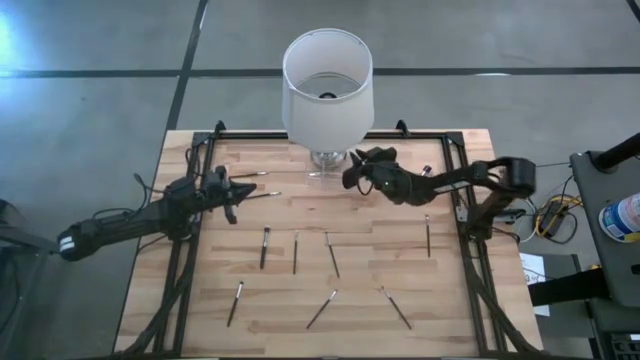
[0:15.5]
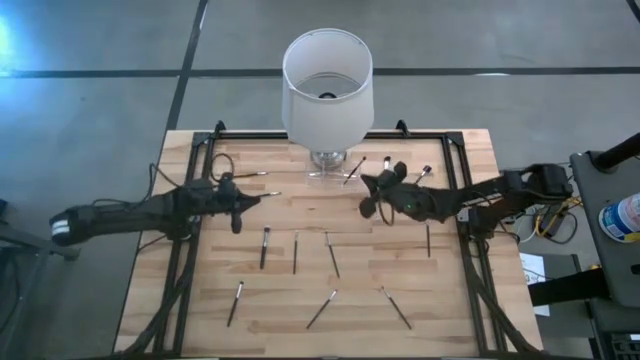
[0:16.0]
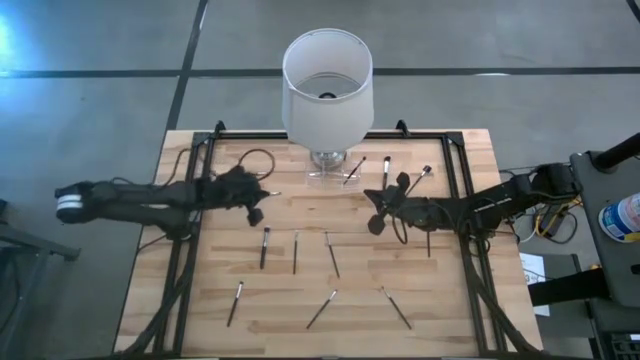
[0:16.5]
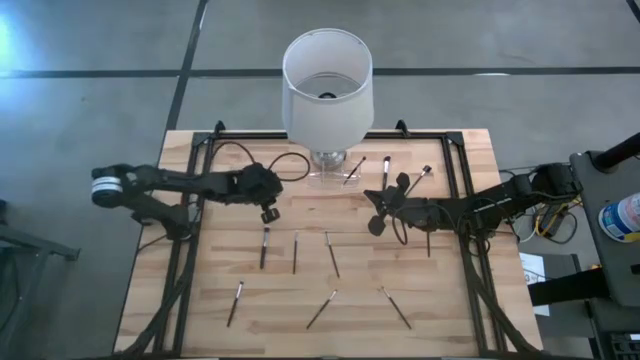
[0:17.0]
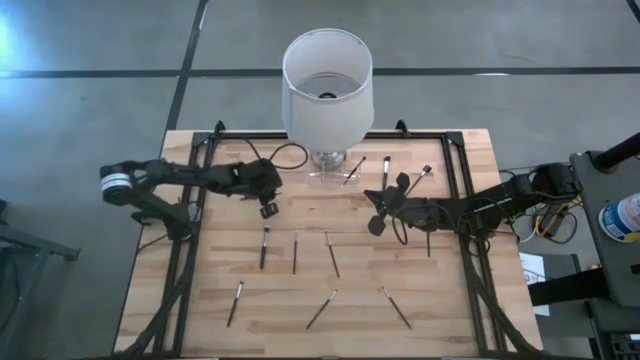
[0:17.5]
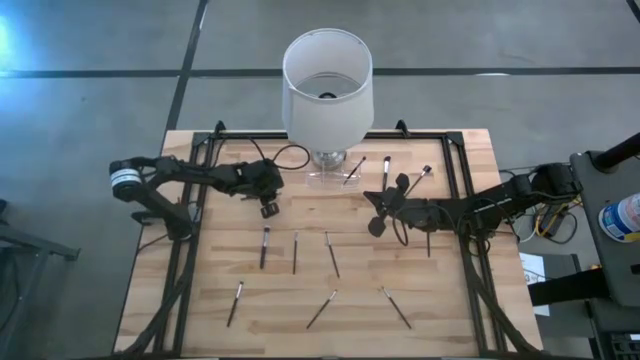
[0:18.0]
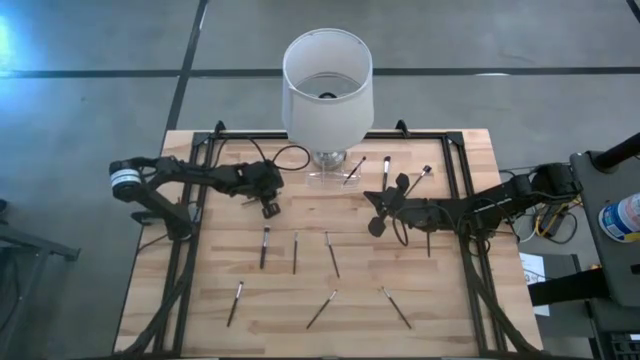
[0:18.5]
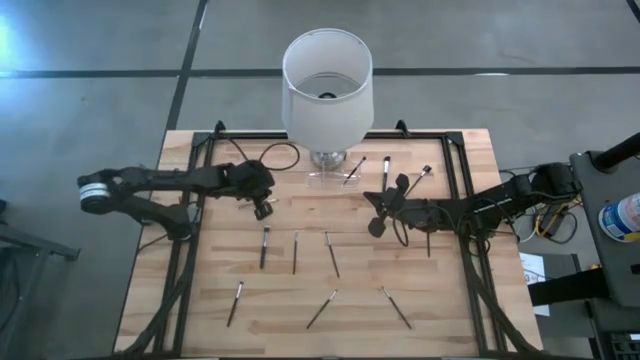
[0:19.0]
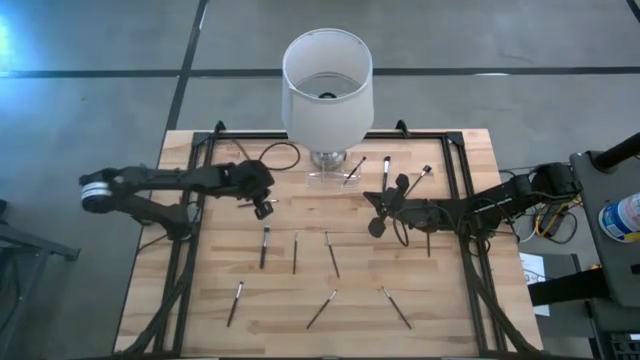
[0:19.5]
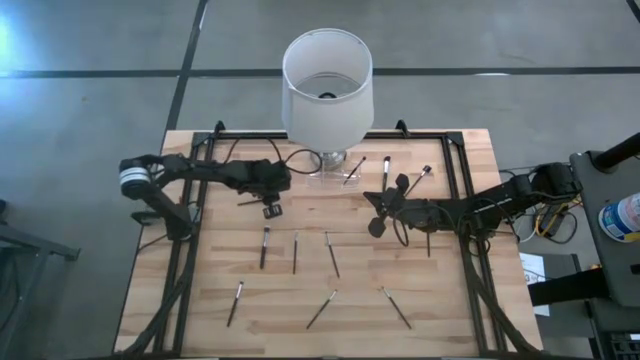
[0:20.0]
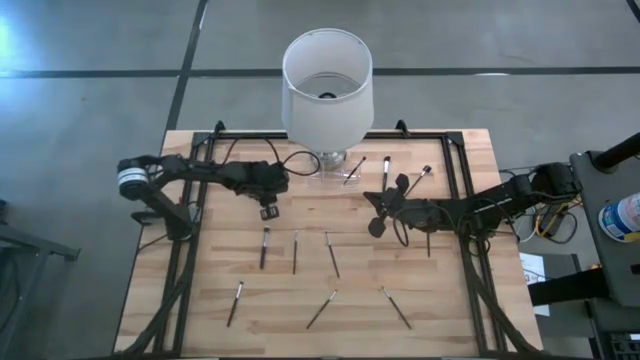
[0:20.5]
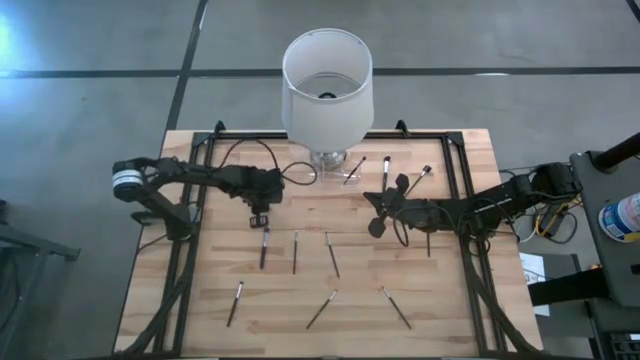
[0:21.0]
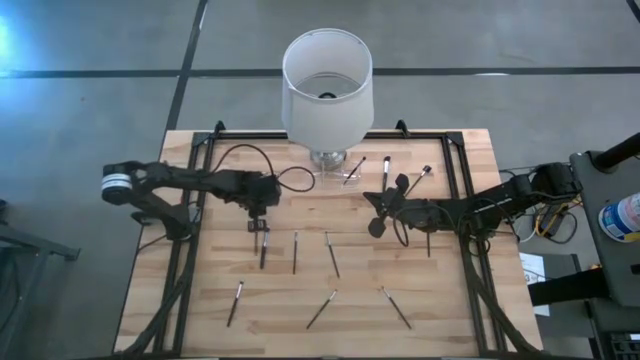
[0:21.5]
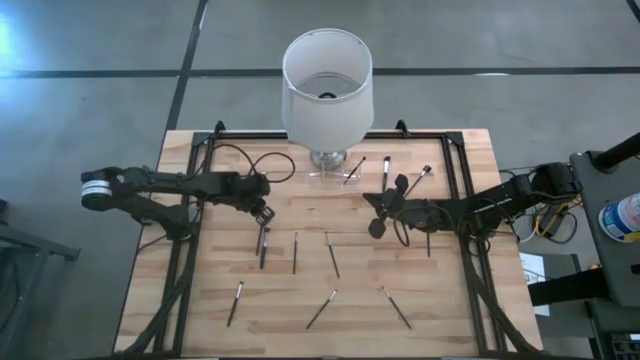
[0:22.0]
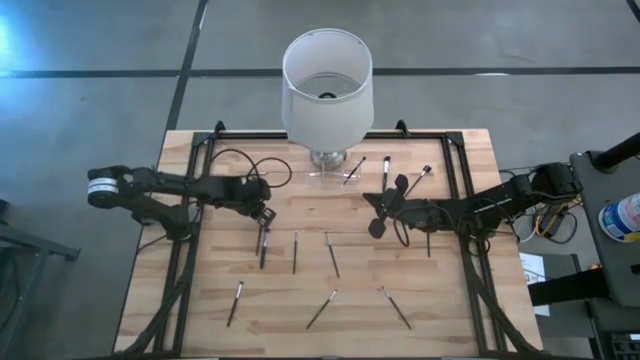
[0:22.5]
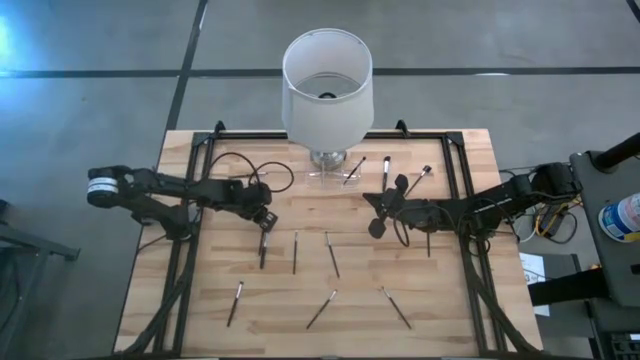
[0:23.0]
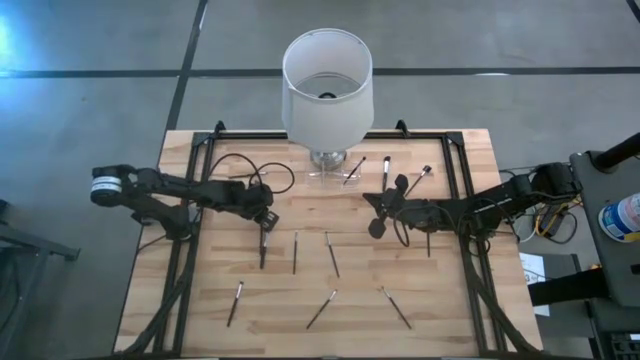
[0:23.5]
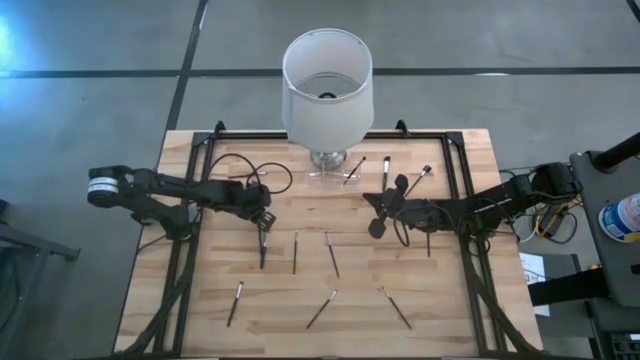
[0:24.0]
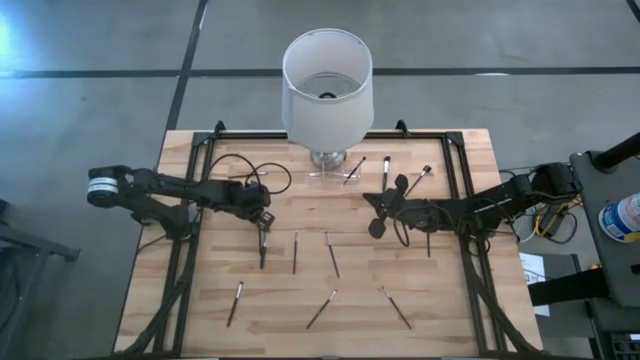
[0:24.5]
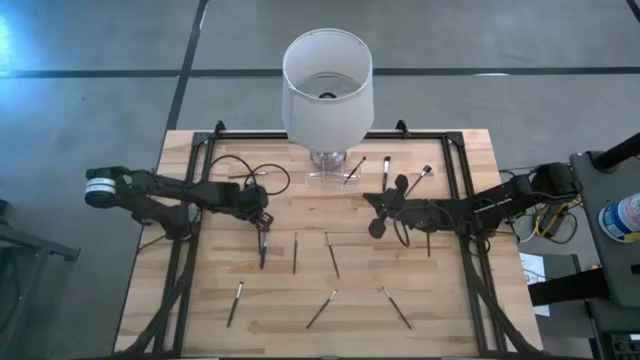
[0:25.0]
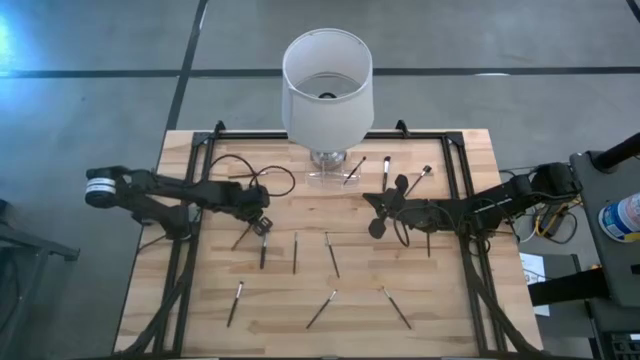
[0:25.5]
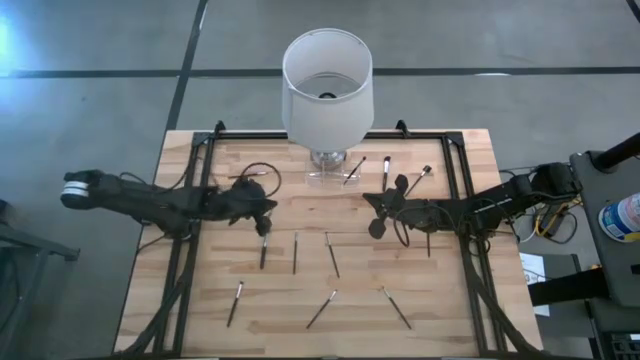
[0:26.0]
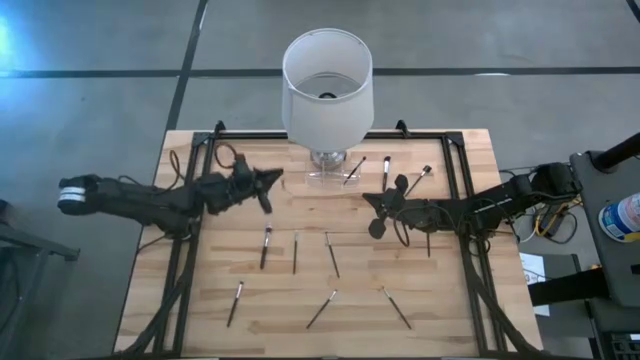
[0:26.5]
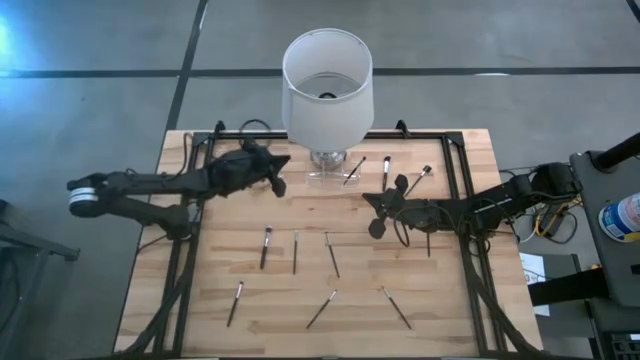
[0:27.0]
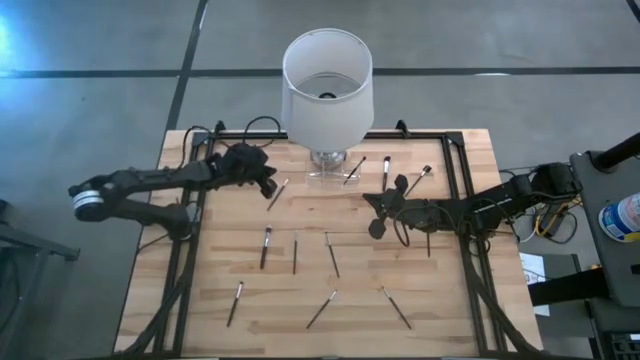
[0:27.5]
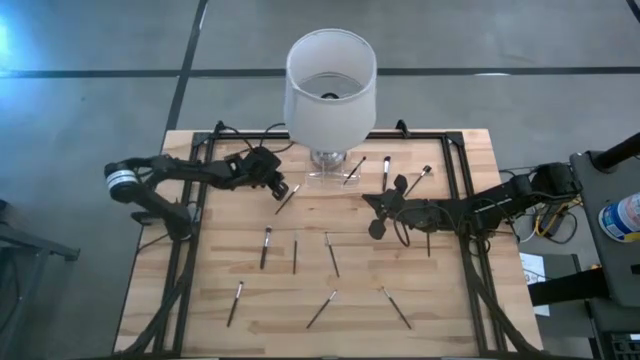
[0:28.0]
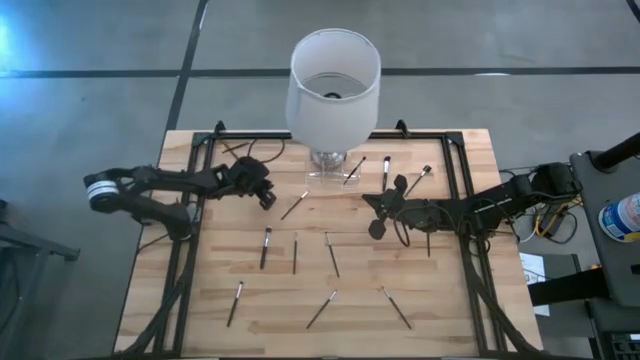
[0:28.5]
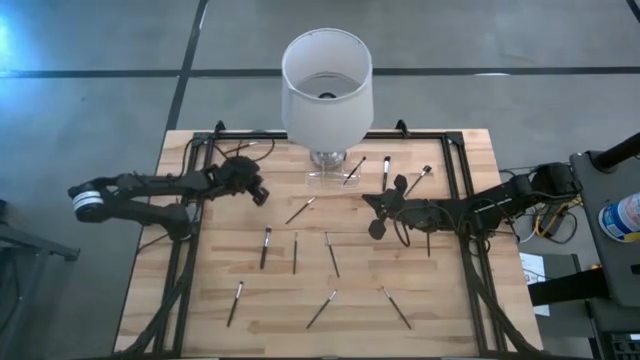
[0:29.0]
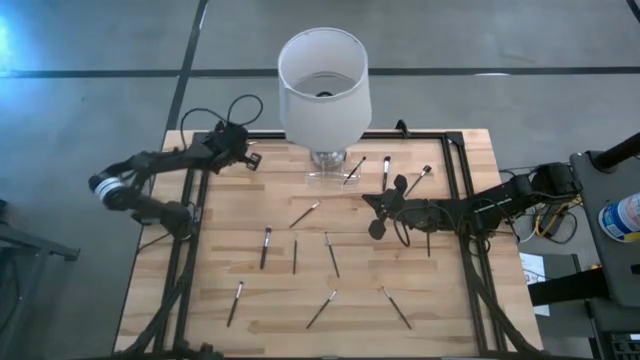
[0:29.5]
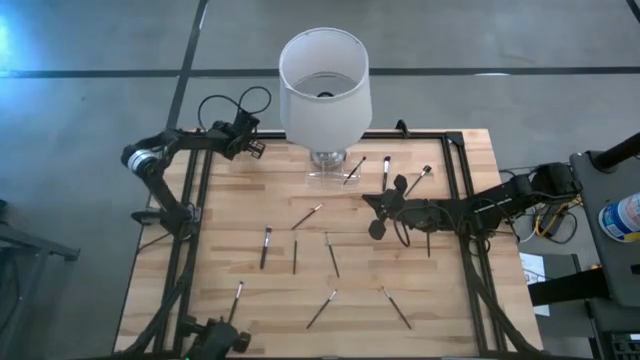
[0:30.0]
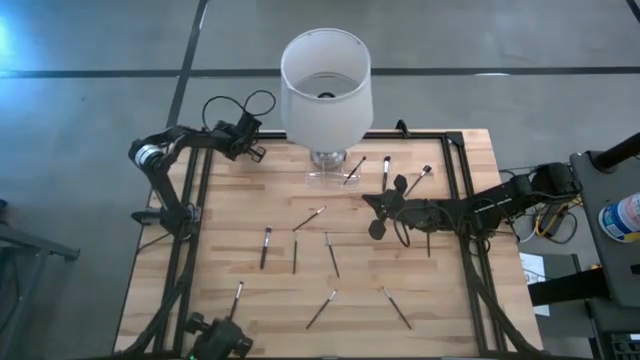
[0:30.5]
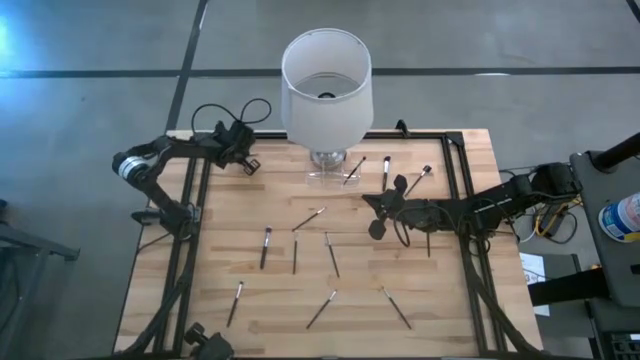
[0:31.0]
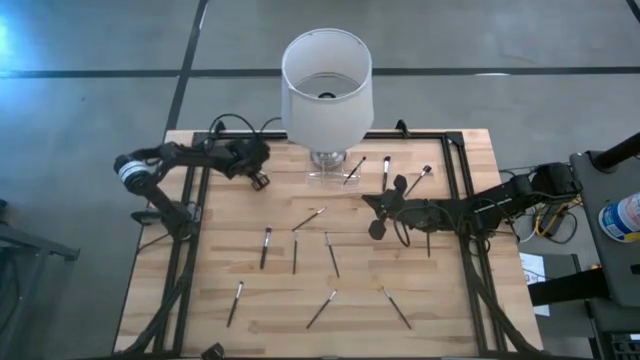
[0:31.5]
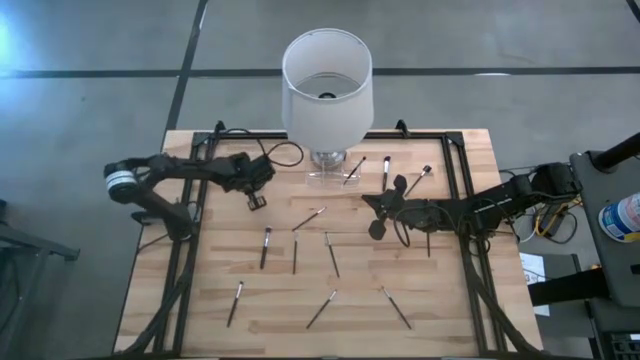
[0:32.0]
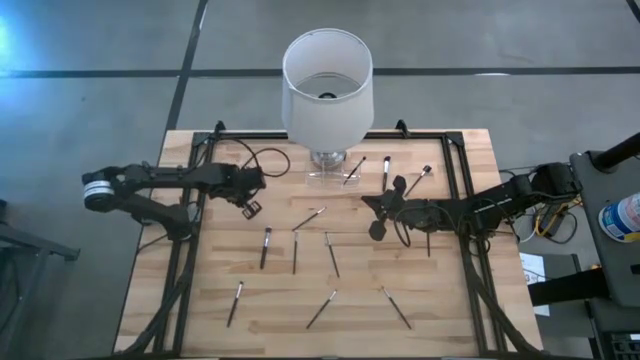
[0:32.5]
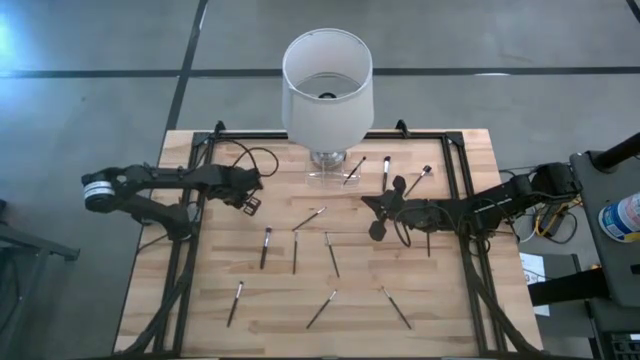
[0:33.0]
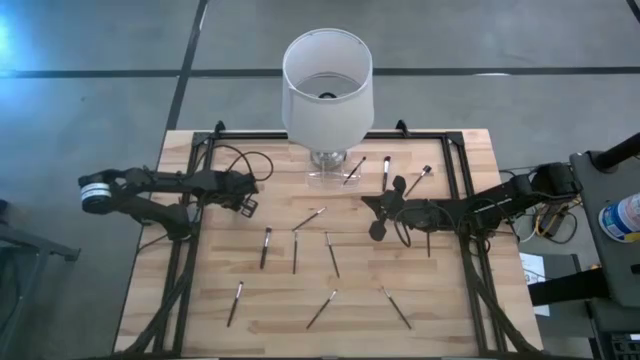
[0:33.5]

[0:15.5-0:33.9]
Task: Put items in baskets/containers
Put the black eyeshadow brush into the transparent organizer

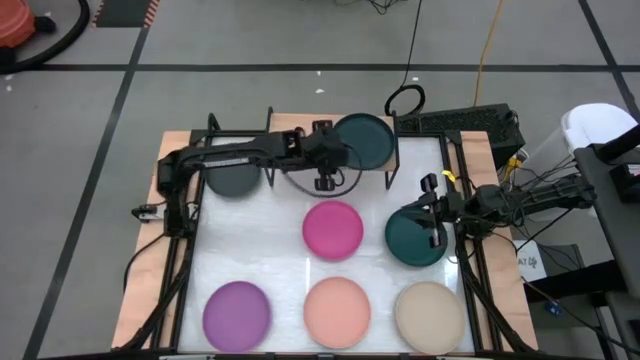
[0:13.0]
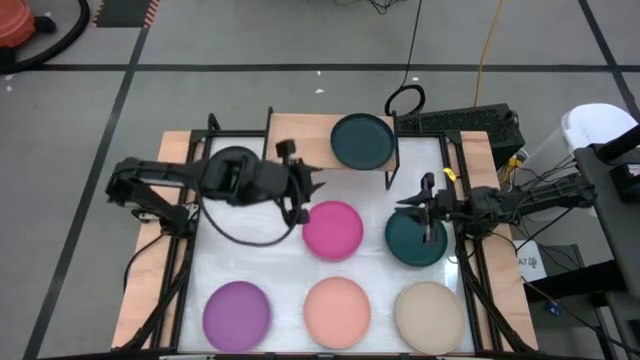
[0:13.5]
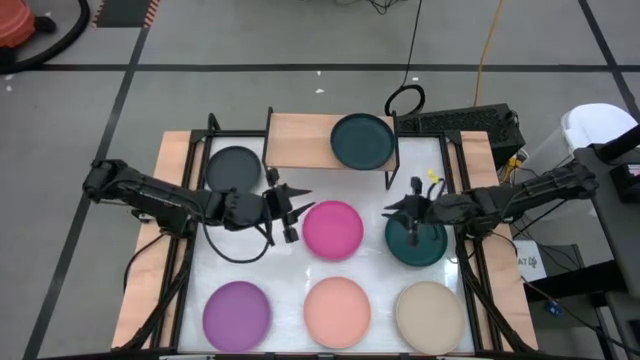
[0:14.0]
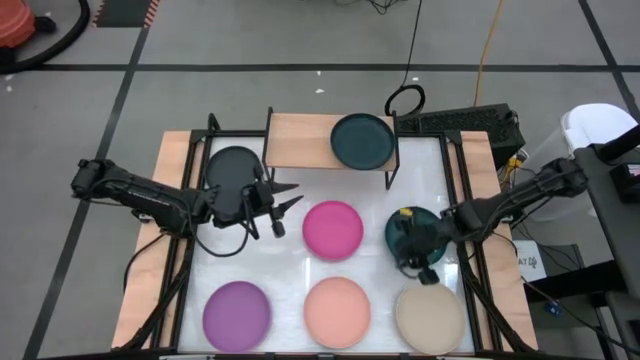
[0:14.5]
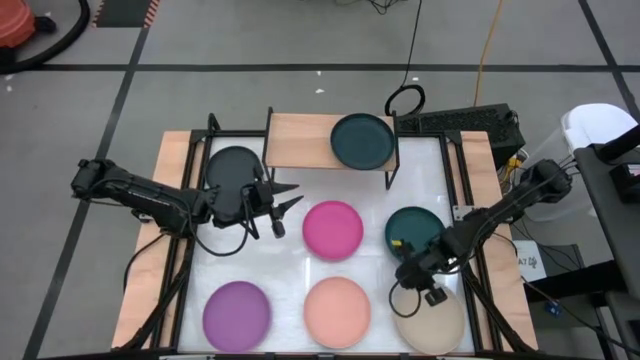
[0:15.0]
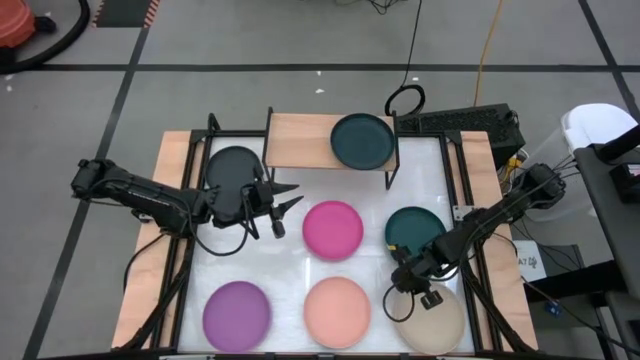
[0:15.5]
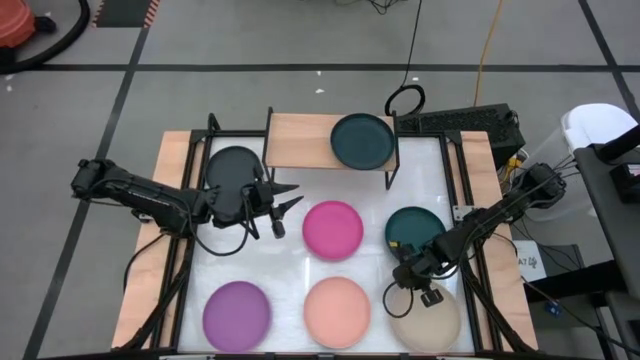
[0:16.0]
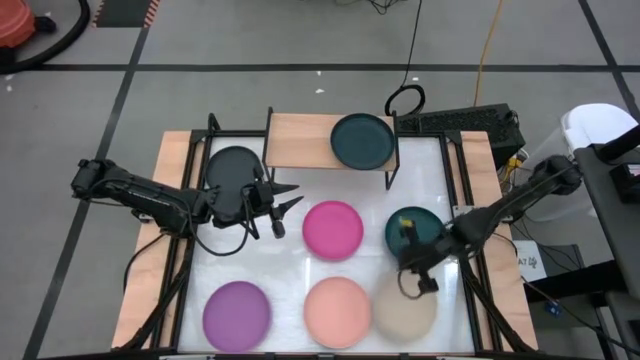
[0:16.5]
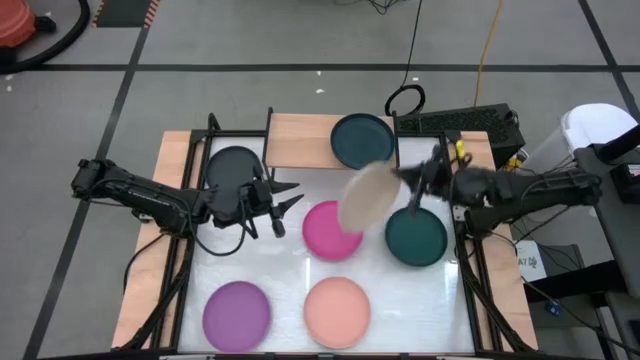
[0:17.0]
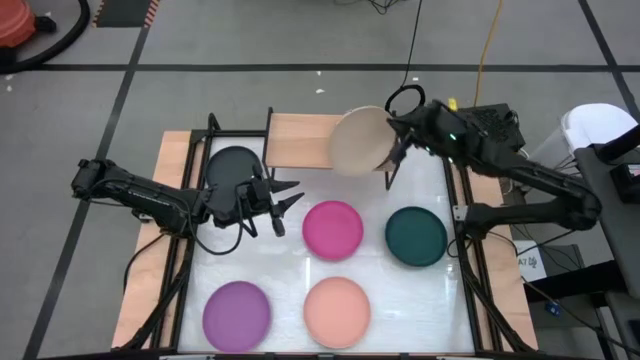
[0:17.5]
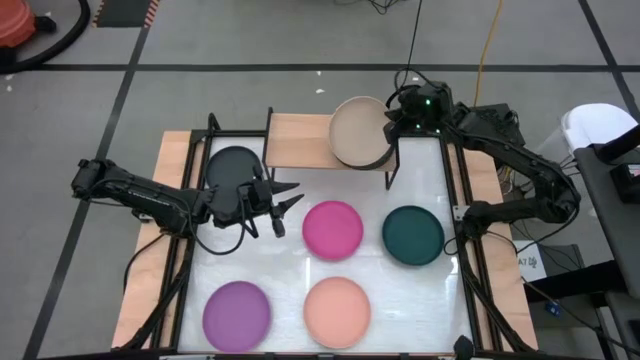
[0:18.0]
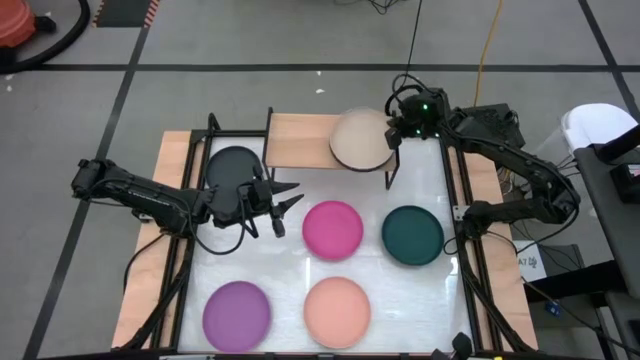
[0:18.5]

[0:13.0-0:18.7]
Task: Place and stack plates onto a shelf
Stack the brown plate on top of the dark green plate on the shelf
